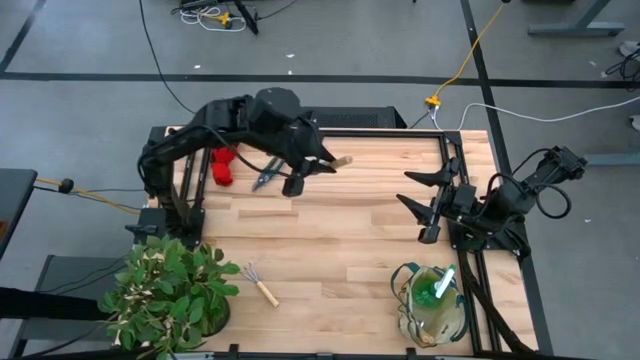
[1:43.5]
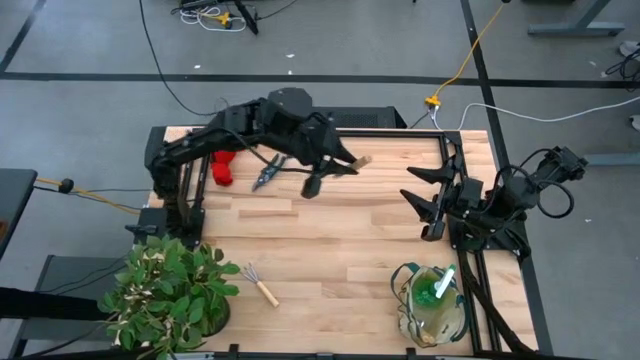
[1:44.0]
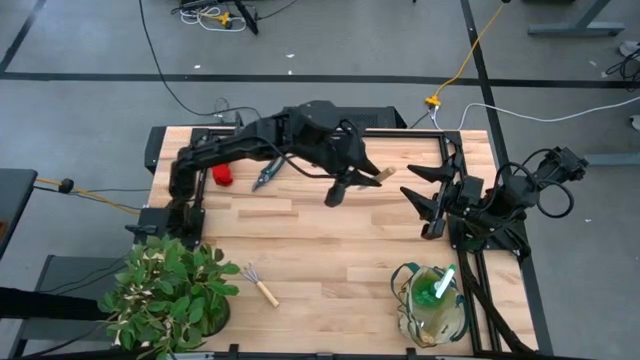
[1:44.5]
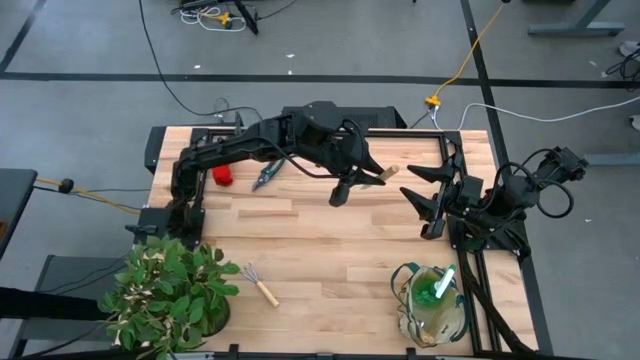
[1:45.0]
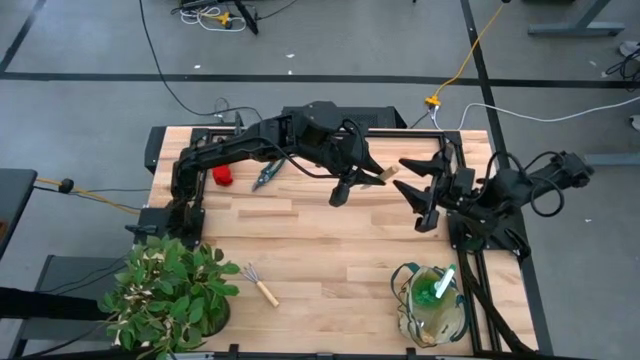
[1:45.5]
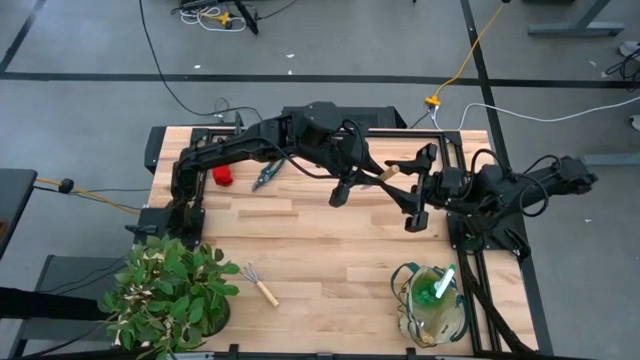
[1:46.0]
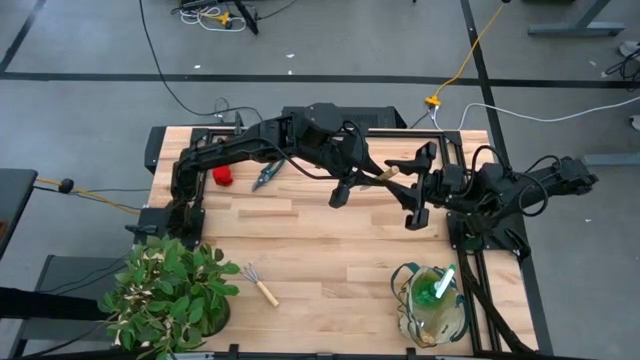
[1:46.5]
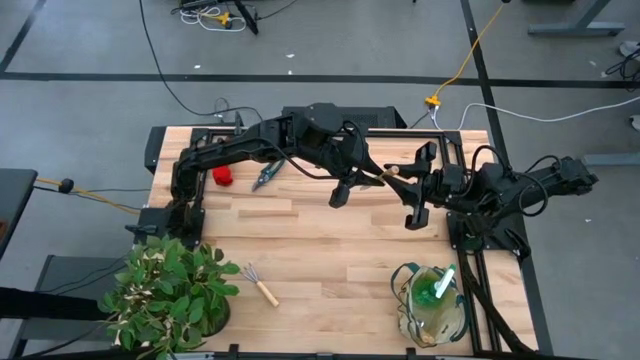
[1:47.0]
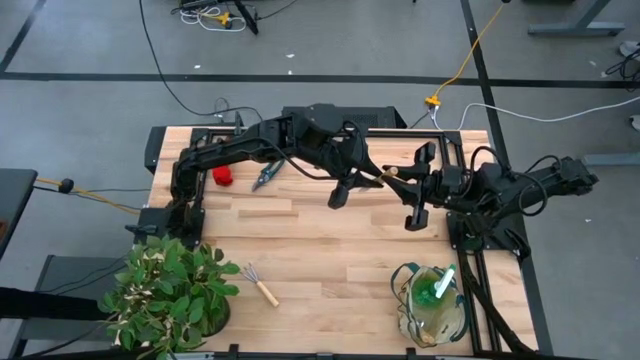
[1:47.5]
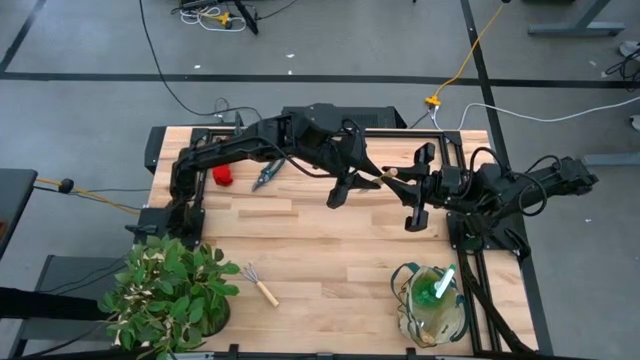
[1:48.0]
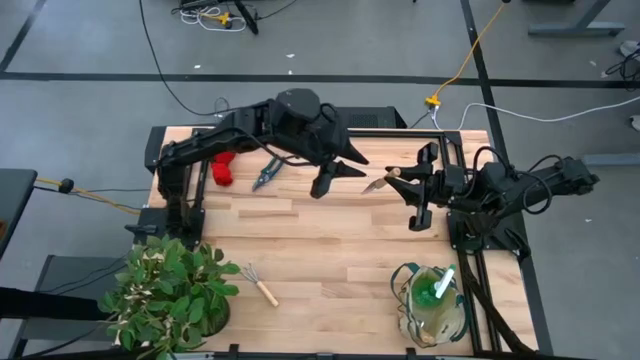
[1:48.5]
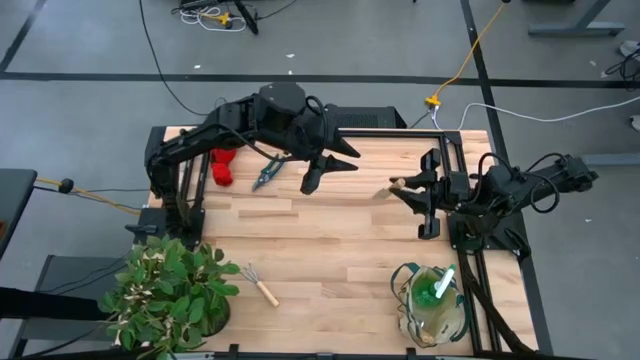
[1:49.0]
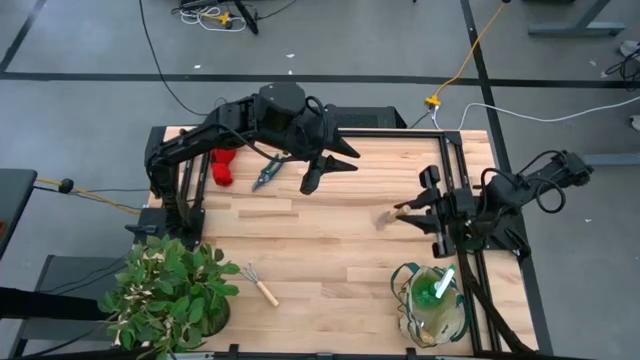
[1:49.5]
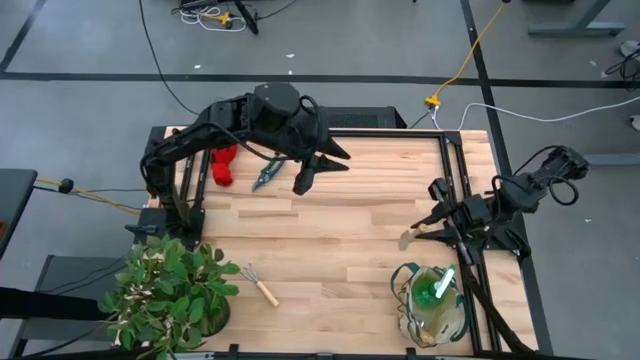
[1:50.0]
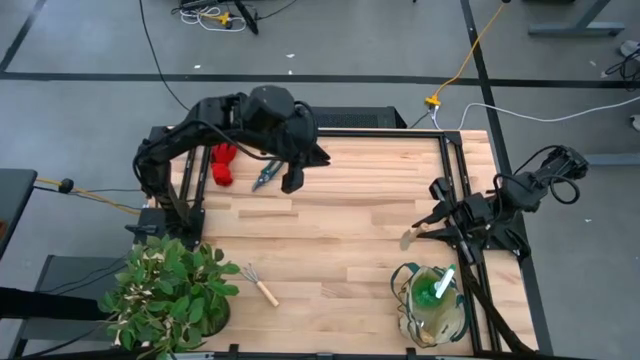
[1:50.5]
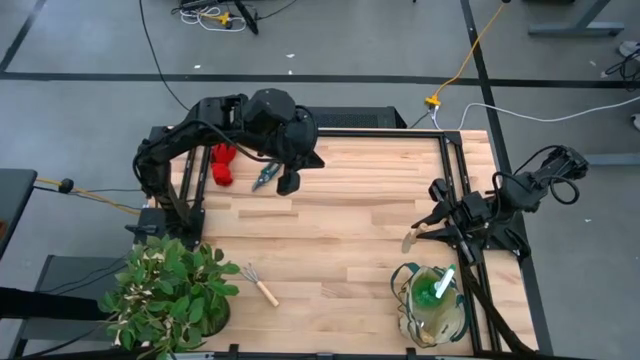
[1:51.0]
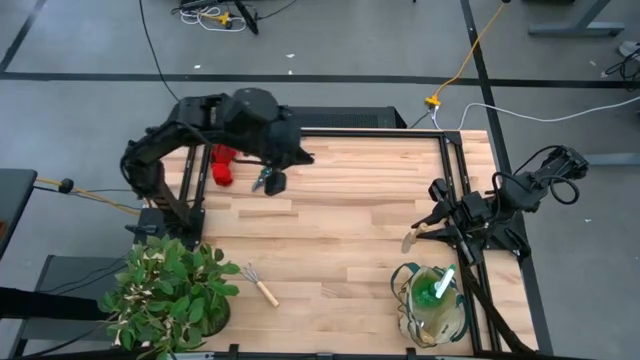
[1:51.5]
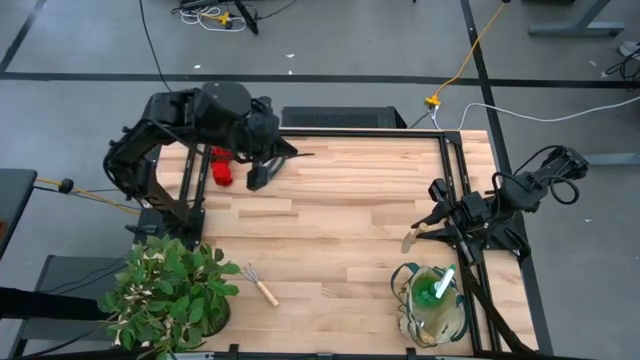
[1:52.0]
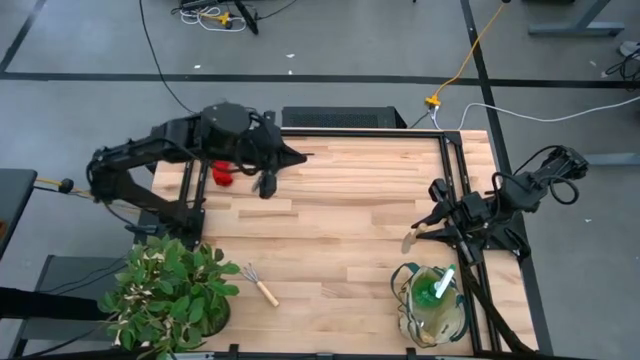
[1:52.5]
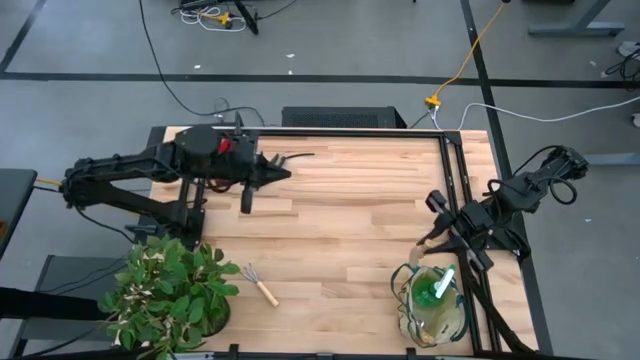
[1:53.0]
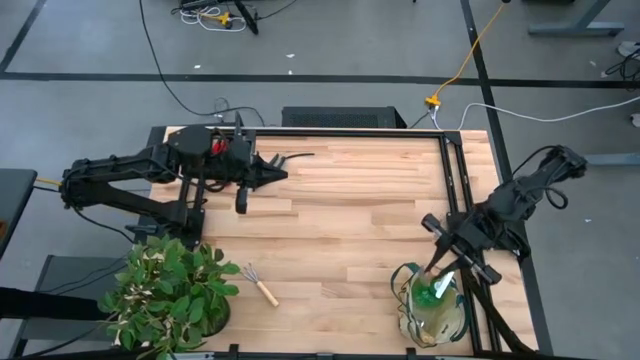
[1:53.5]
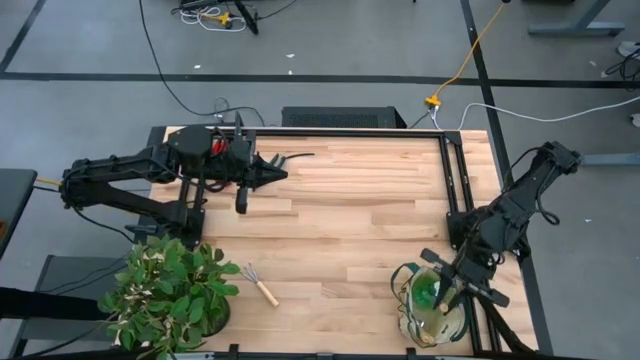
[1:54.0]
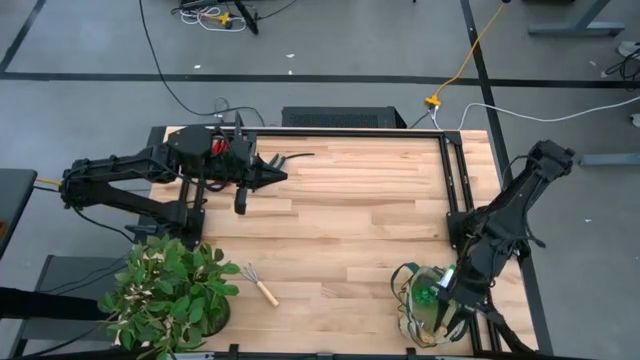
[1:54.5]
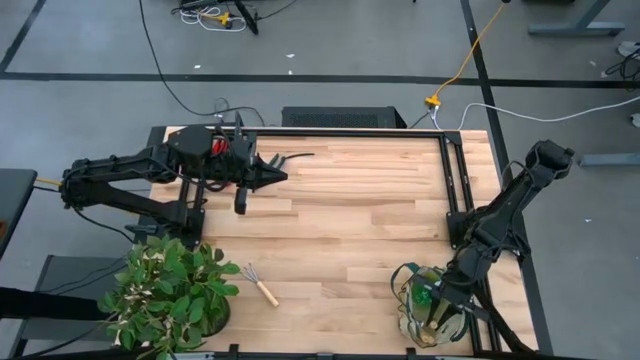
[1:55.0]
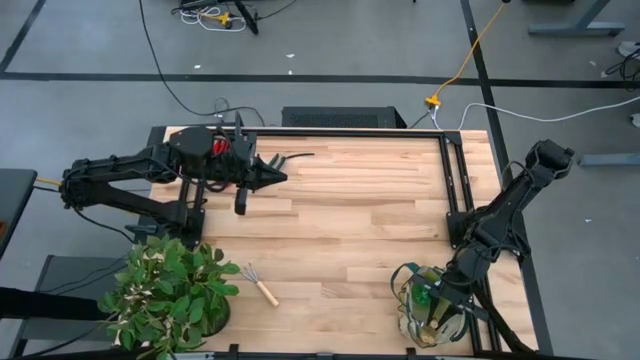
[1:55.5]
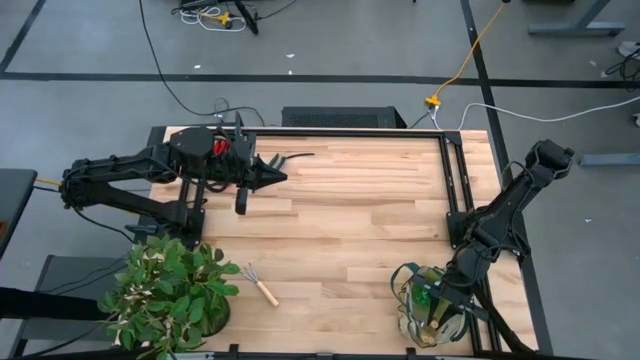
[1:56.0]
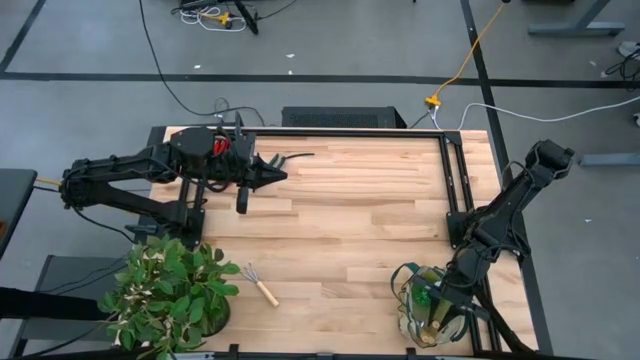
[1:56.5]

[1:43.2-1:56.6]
Task: Pick & Place Garden tools in Gardening bag
Put the brown trowel into the white gardening bag

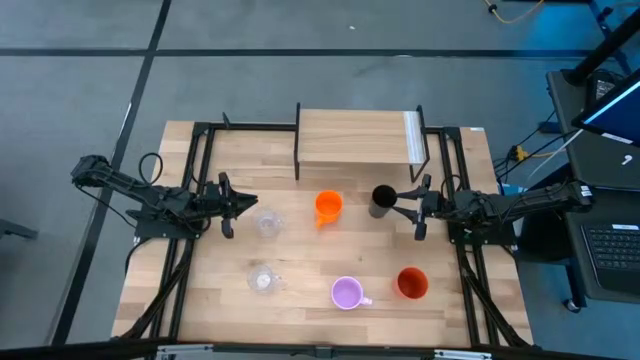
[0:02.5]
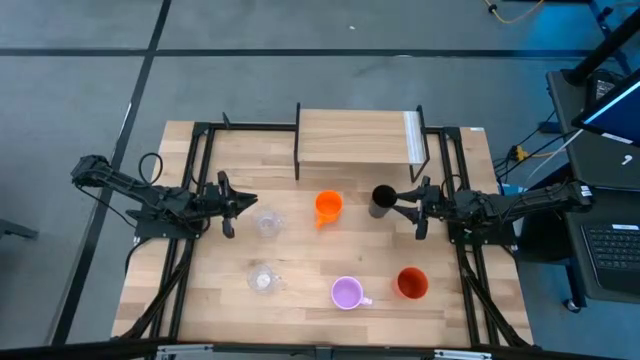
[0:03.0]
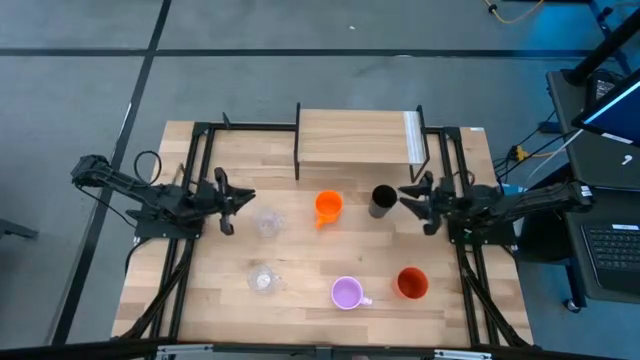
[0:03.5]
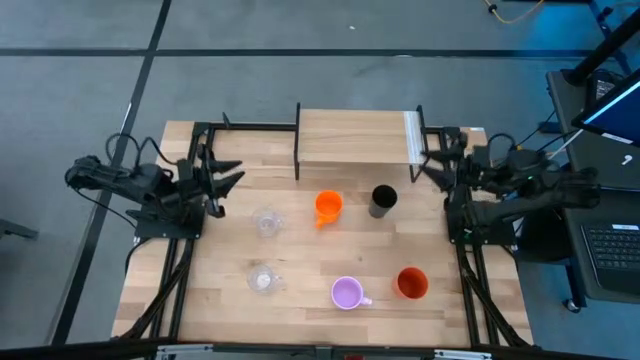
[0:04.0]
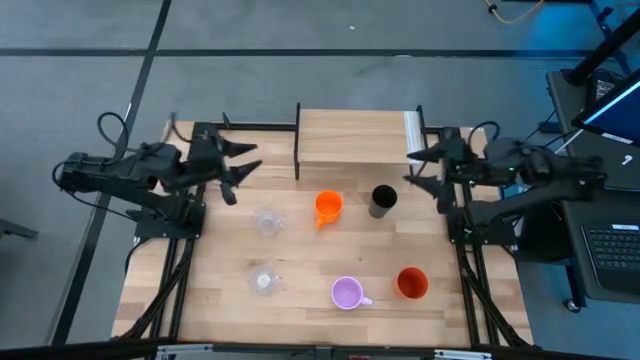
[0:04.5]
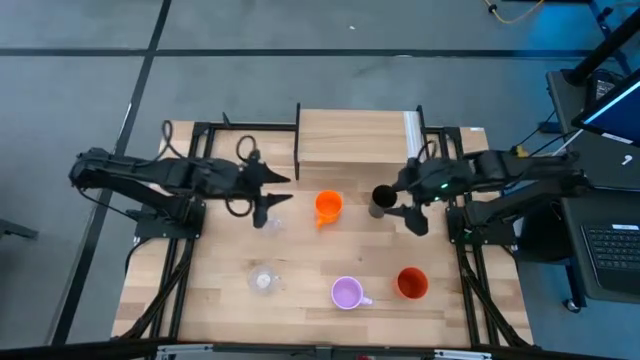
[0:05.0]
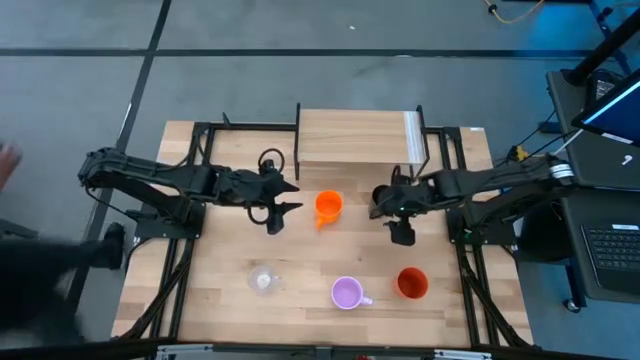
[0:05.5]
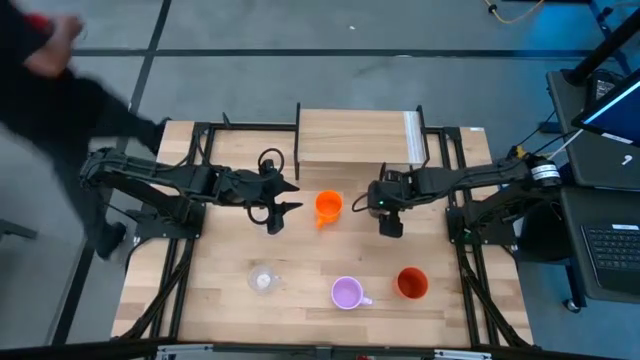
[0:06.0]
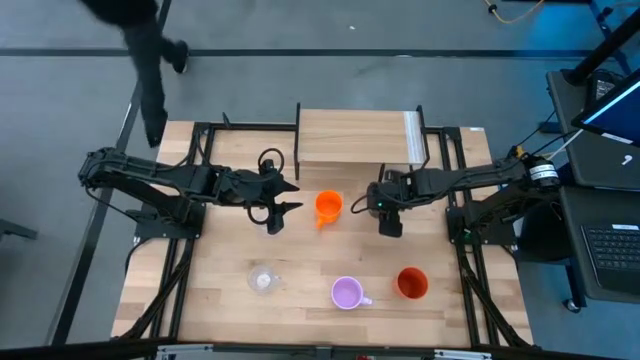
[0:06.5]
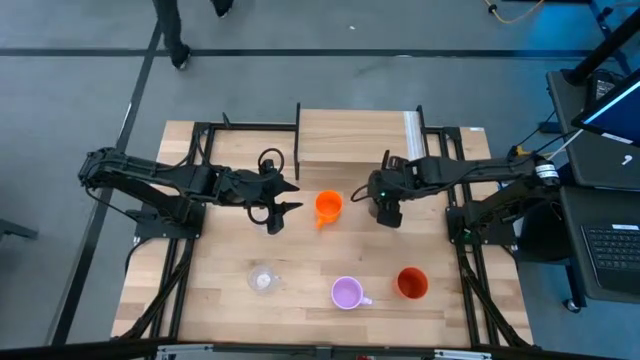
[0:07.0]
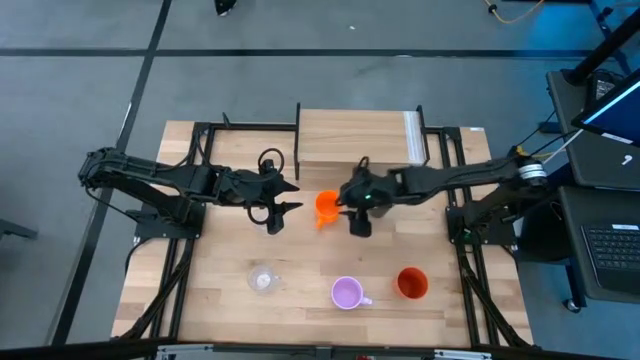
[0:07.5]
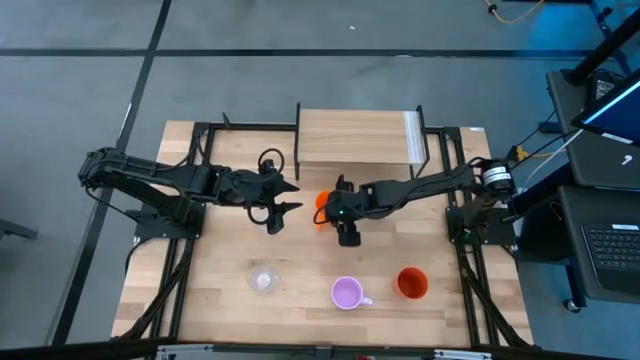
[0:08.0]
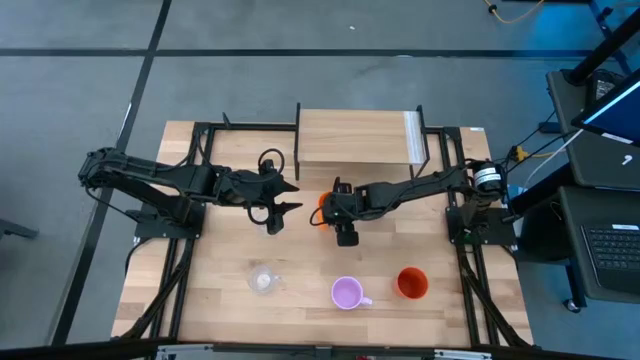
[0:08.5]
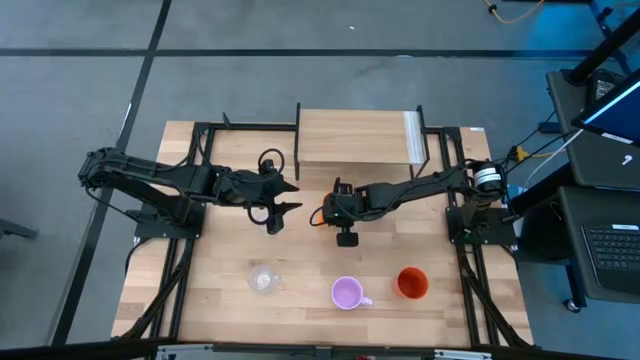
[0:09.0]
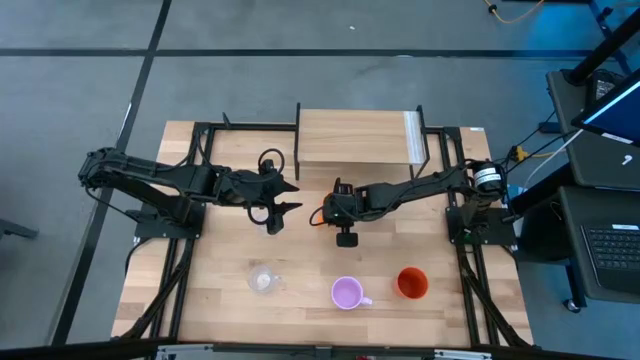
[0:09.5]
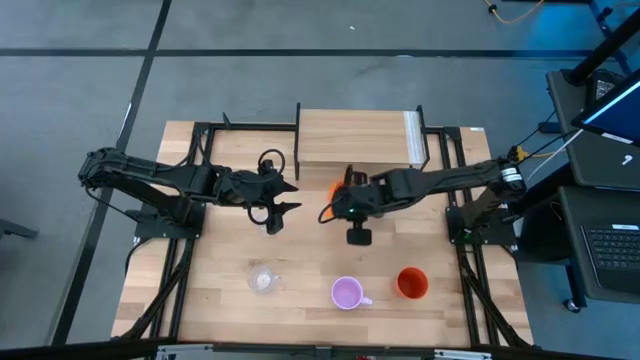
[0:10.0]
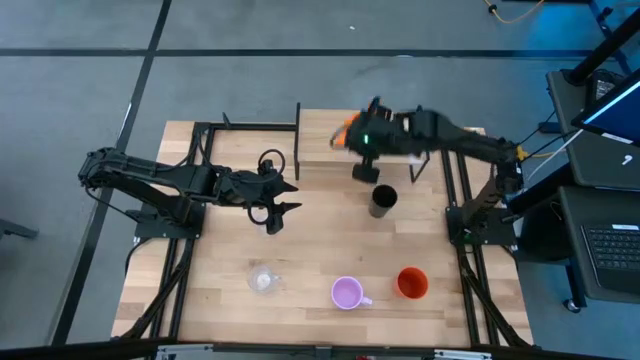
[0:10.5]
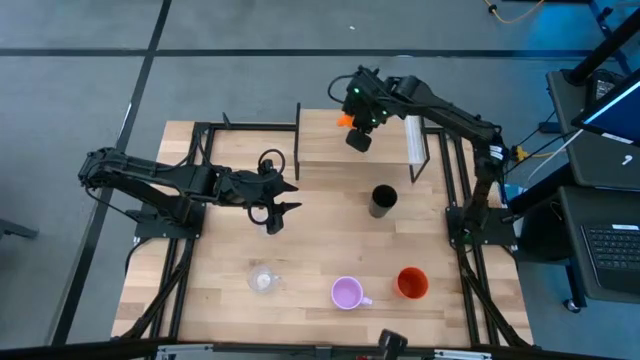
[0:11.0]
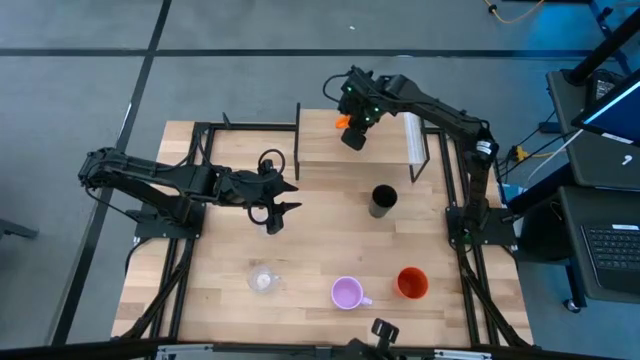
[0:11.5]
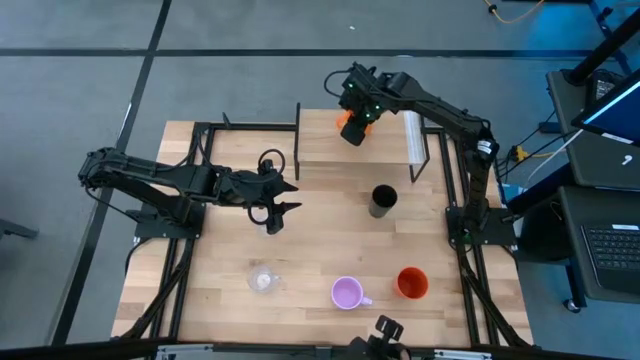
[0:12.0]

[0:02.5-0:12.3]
Task: Stack small to large cups/mugs on shelf
Put the orange mug on the shelf
